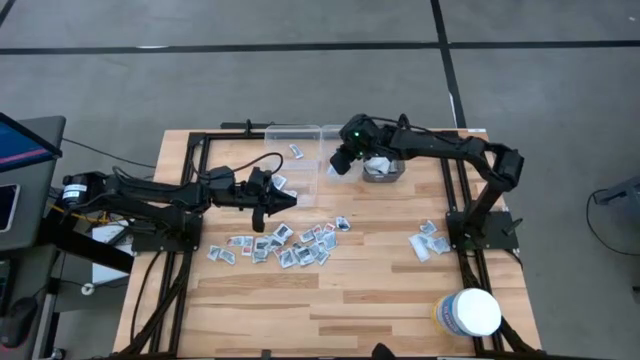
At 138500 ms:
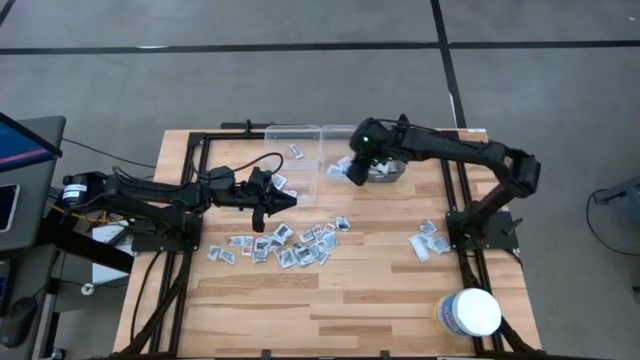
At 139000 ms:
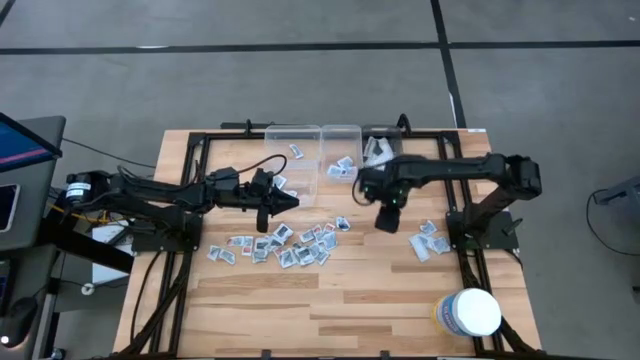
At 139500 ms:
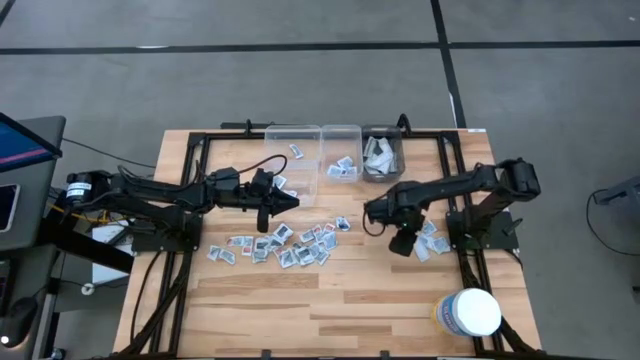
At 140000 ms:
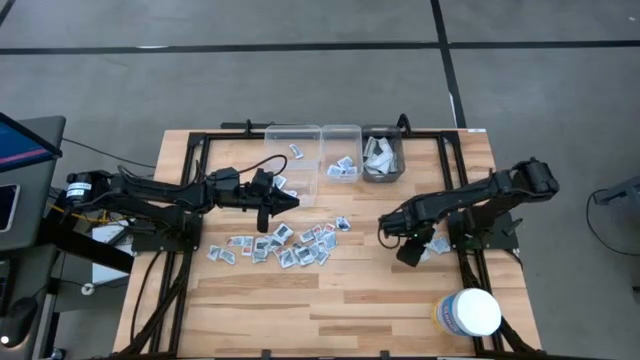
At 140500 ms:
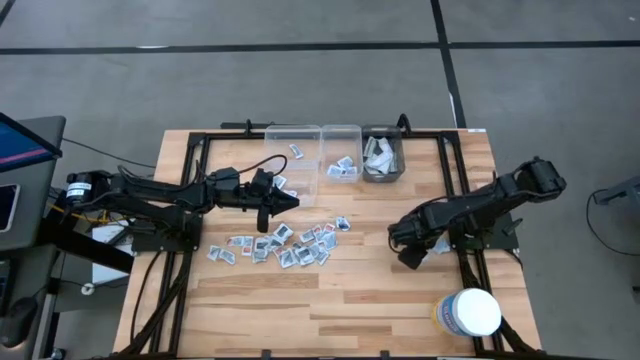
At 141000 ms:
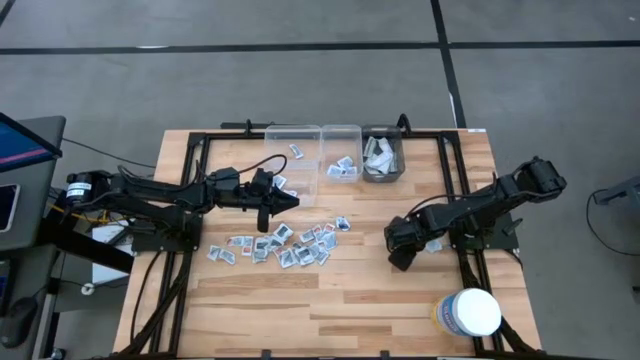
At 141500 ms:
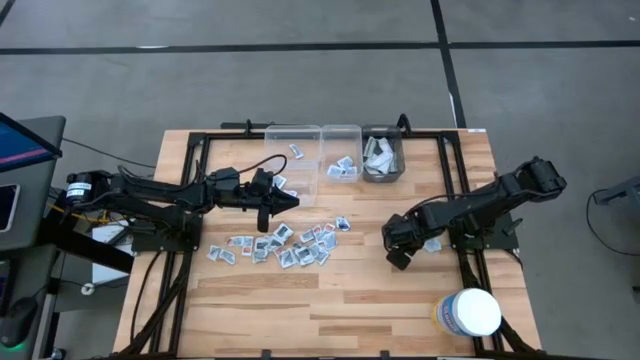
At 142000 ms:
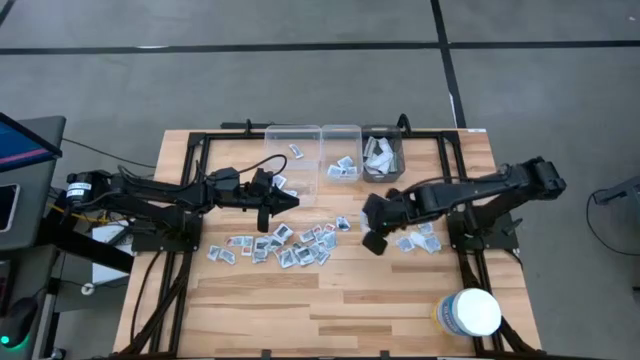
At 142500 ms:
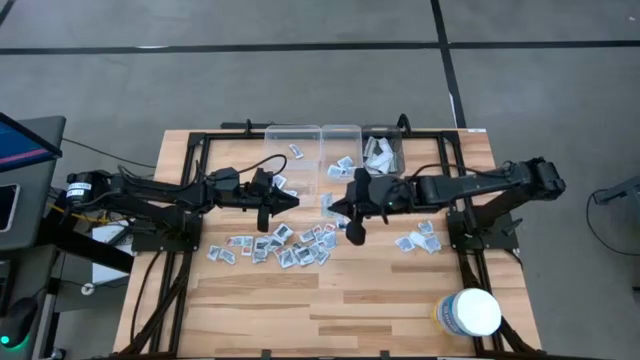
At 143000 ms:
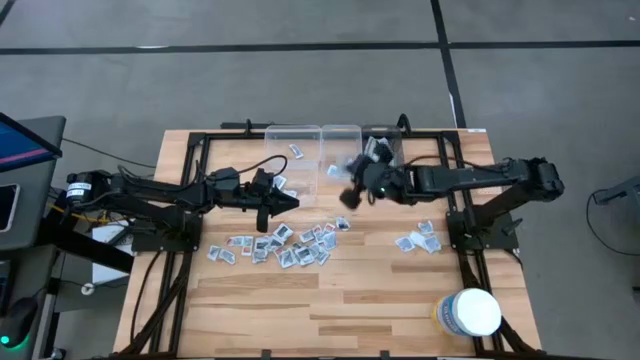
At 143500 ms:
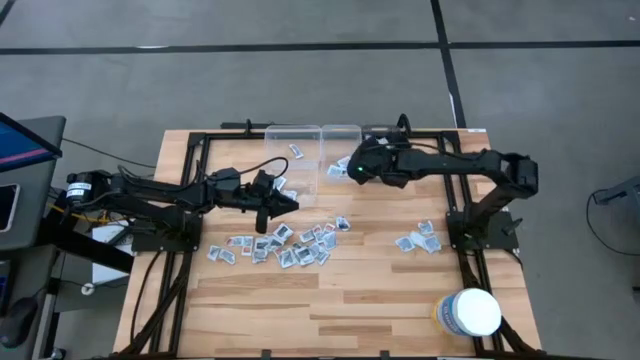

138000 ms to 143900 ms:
Task: Pick & Place First Aid Supplies
Put the bandage pack into the black transparent bin

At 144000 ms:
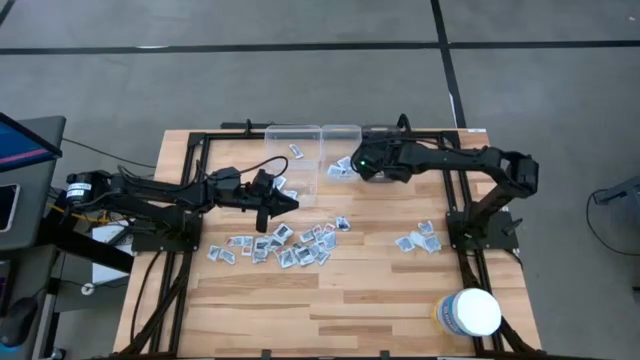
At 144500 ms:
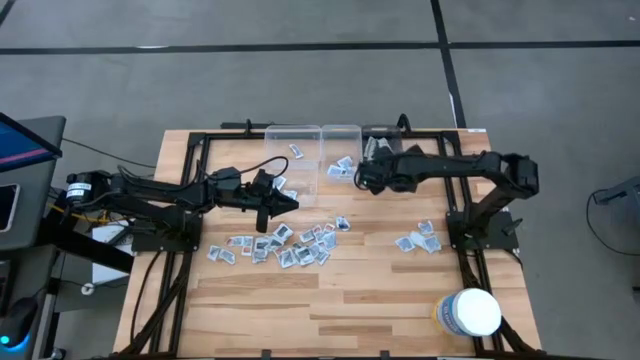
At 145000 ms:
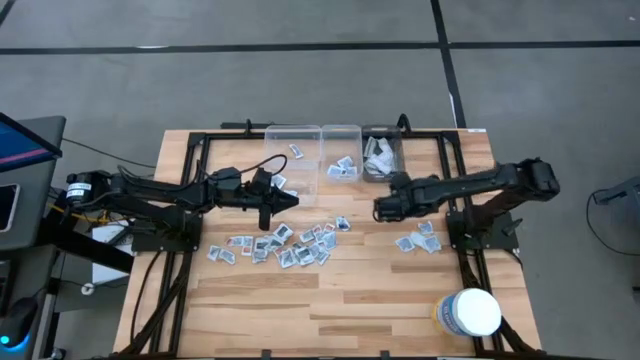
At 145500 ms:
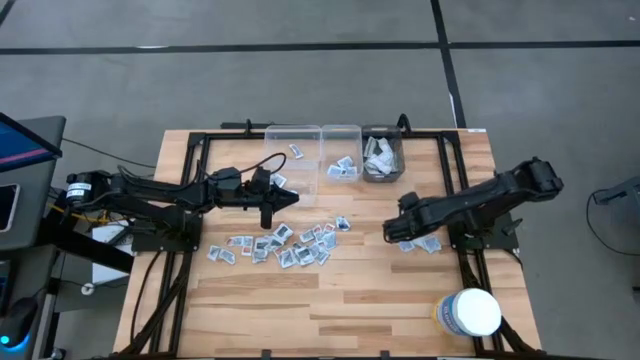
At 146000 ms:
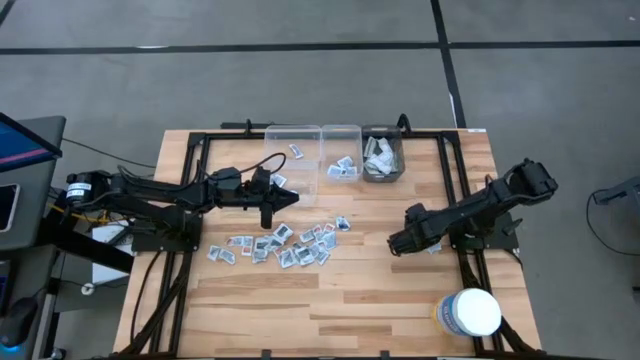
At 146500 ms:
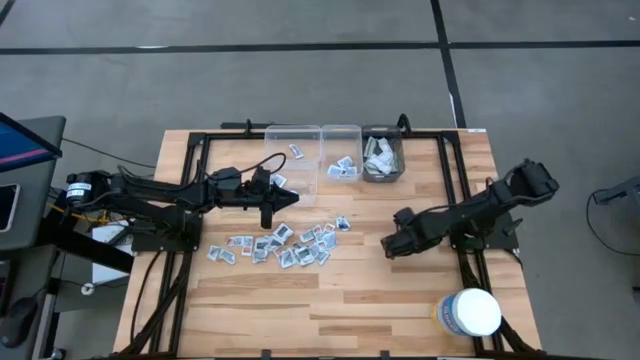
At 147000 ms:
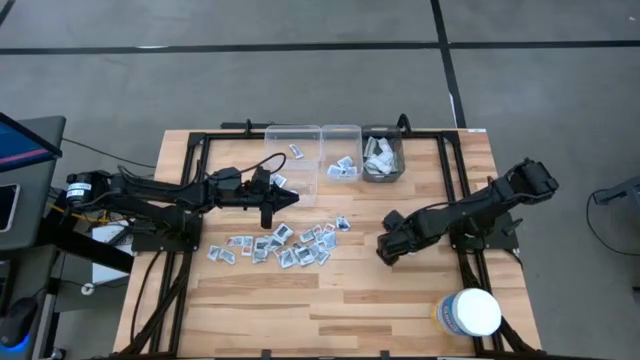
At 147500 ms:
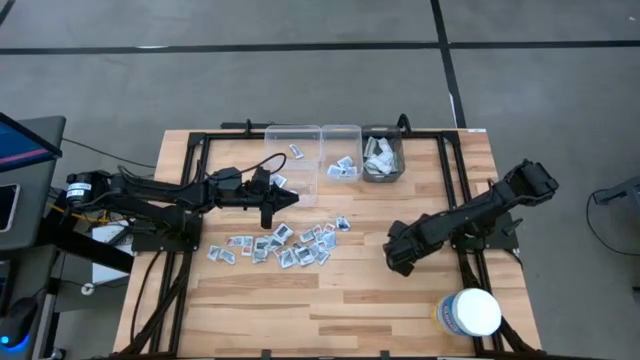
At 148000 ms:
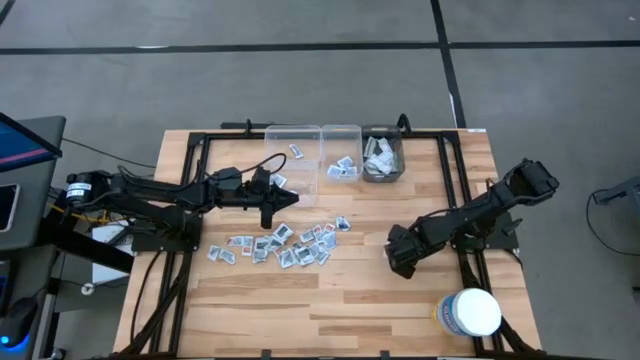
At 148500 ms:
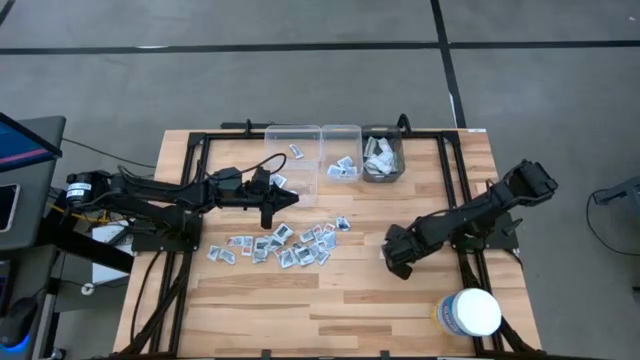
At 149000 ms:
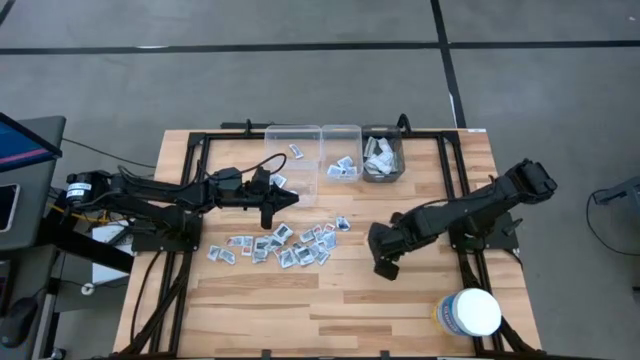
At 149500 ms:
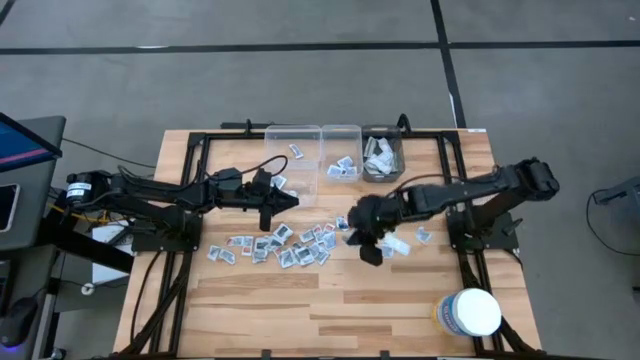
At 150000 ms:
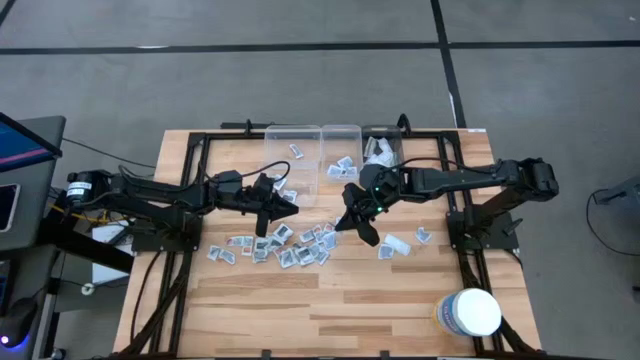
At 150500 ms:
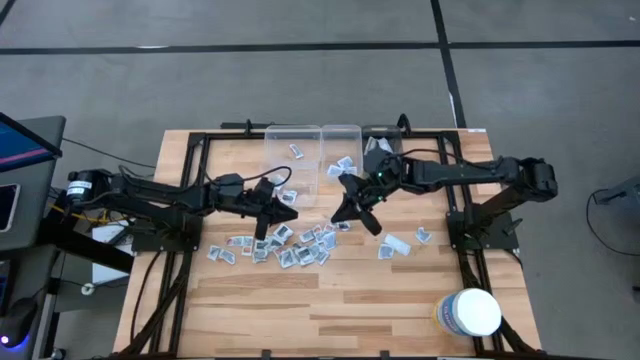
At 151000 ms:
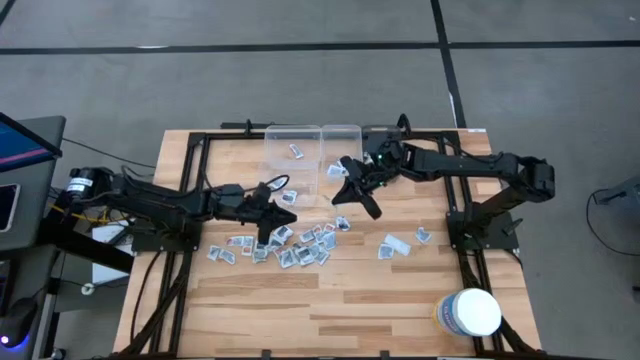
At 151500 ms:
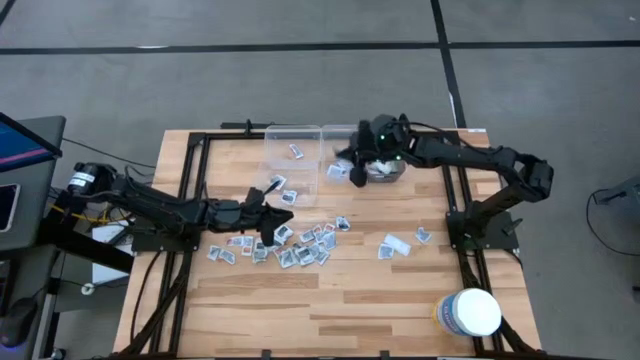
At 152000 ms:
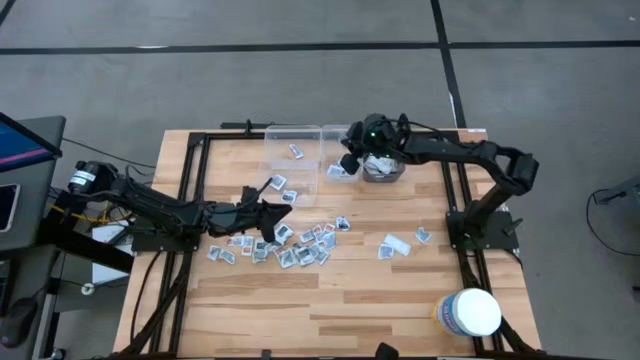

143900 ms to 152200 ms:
Put the alcohol pad into the top right transparent bin

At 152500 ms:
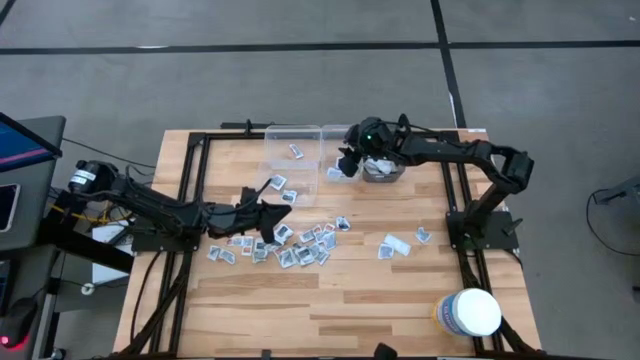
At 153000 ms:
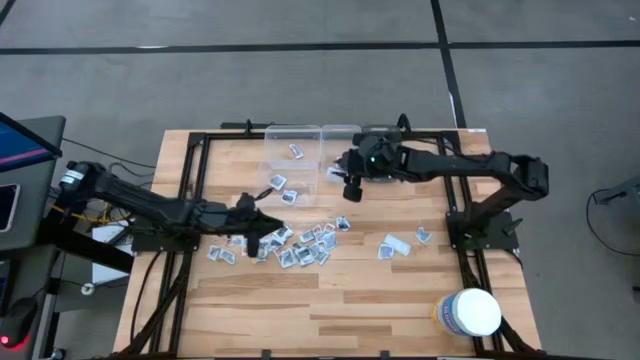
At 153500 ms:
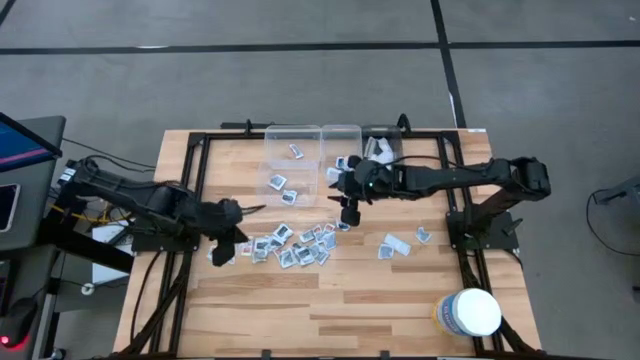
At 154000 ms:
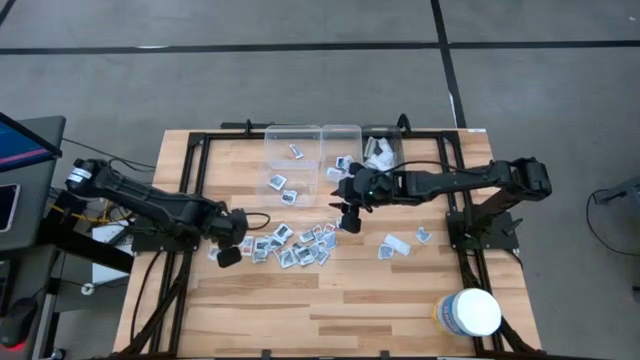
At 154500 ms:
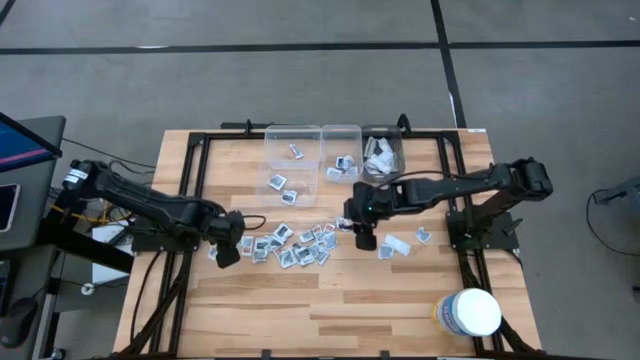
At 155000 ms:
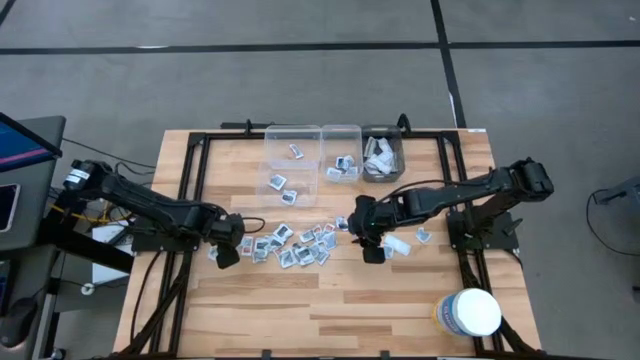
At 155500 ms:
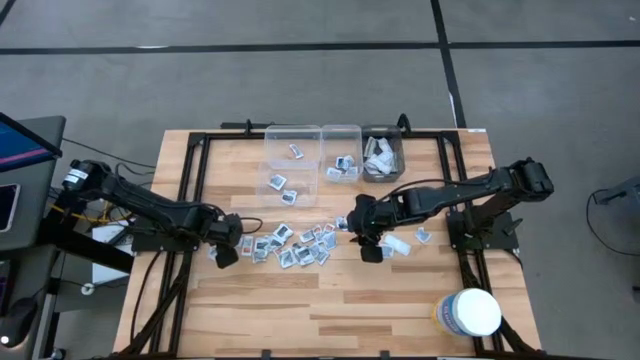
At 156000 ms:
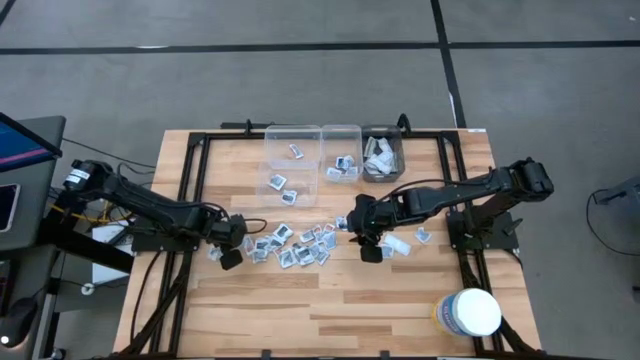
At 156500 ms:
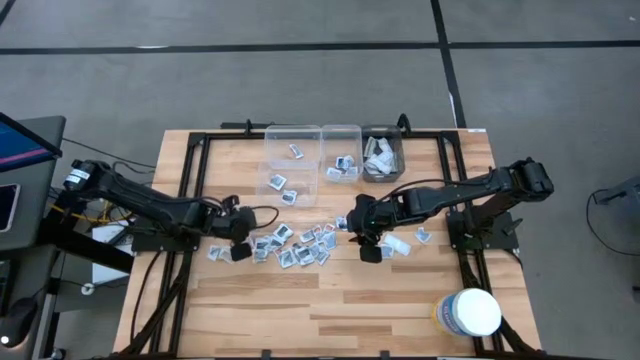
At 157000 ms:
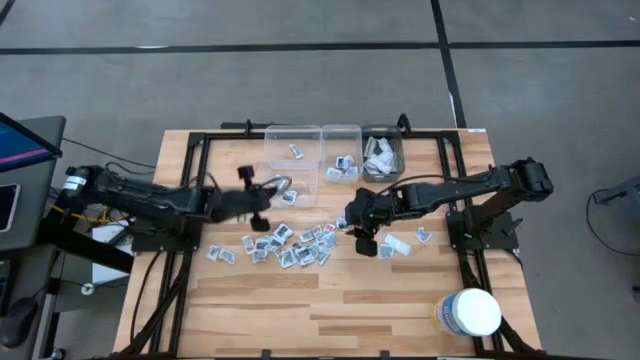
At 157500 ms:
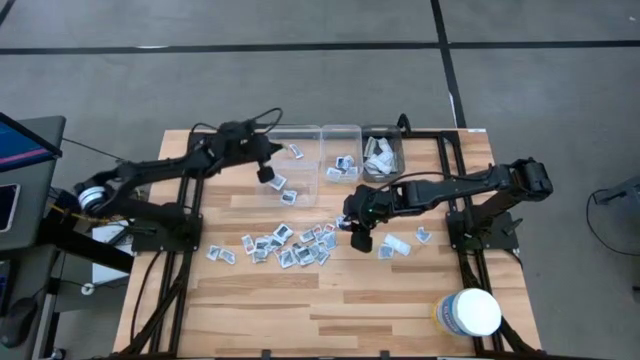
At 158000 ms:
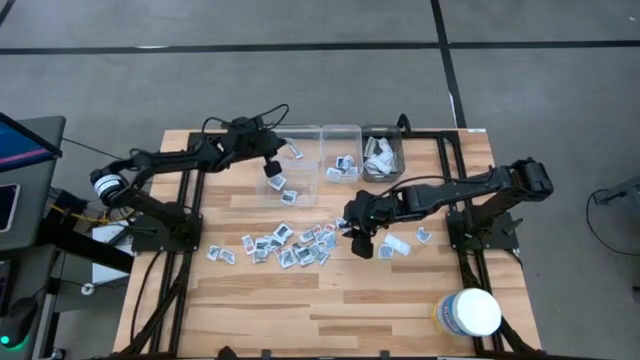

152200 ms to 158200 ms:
Put the ointment pack into the top left transparent bin
